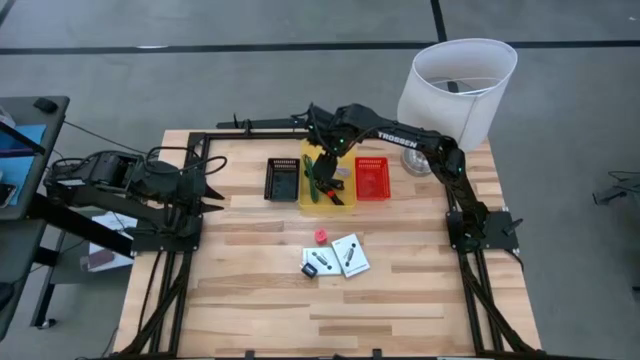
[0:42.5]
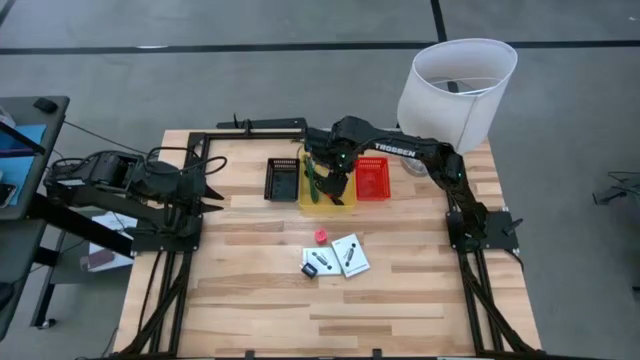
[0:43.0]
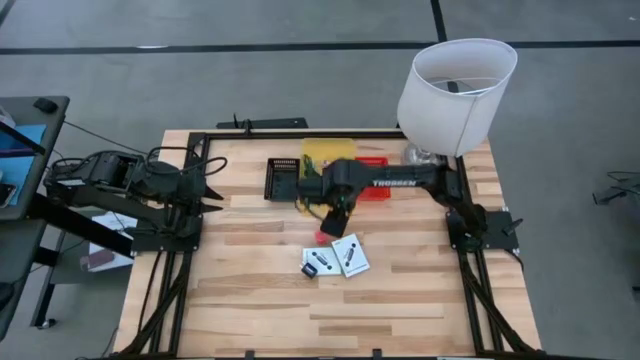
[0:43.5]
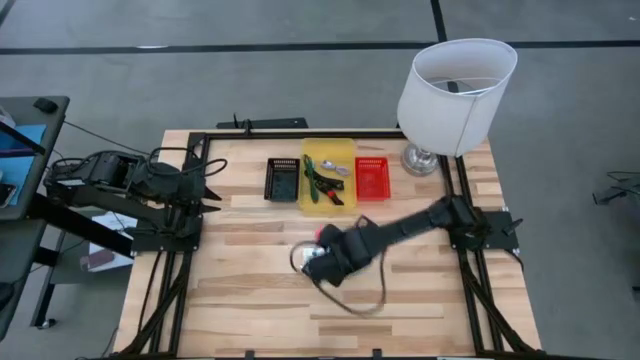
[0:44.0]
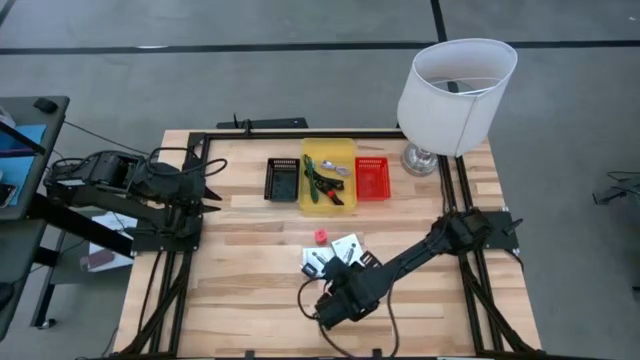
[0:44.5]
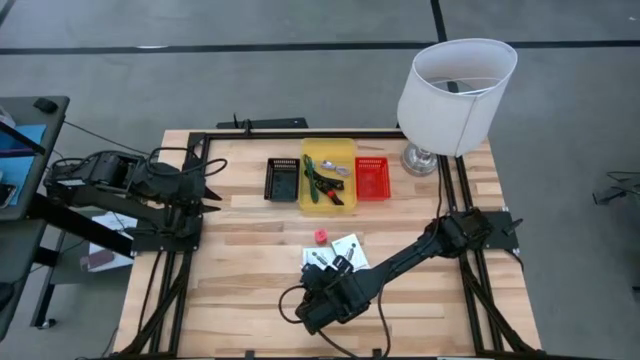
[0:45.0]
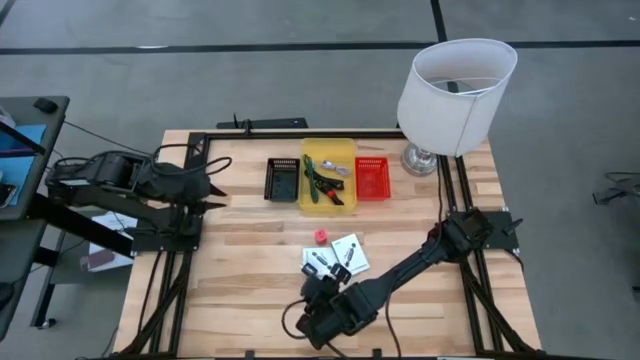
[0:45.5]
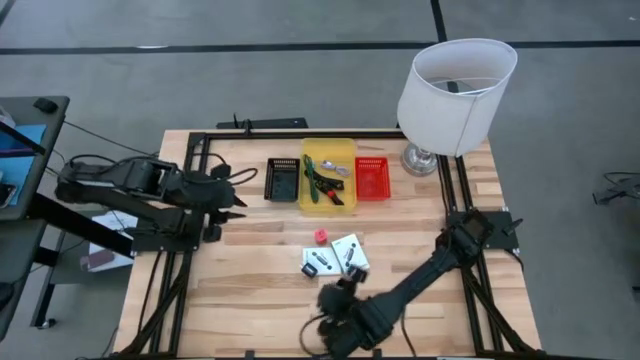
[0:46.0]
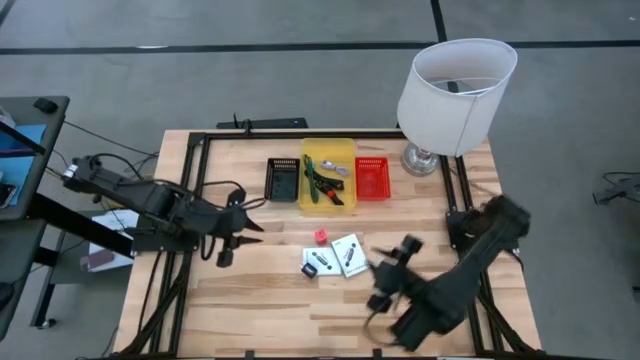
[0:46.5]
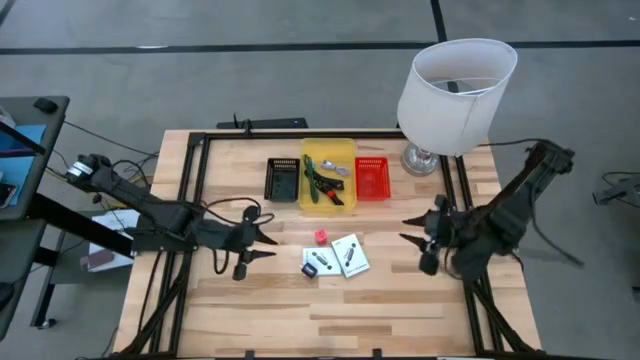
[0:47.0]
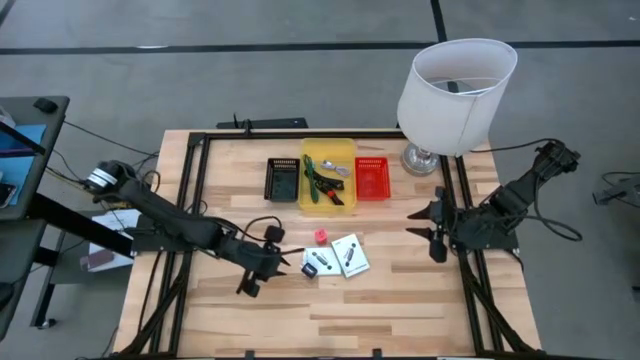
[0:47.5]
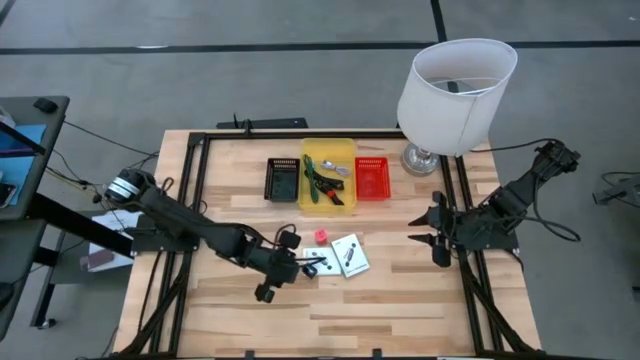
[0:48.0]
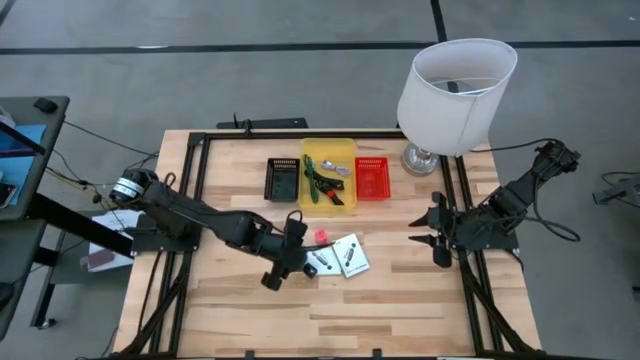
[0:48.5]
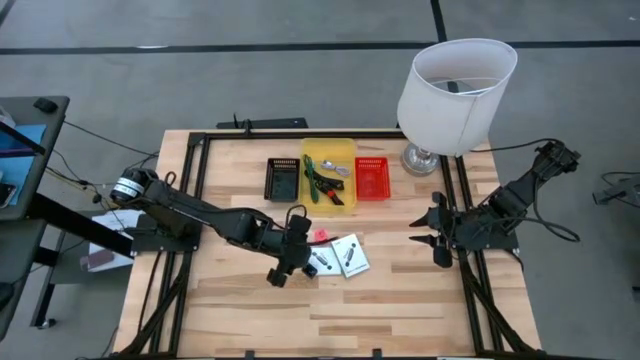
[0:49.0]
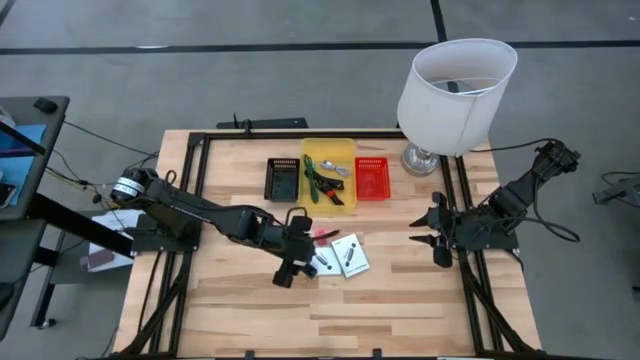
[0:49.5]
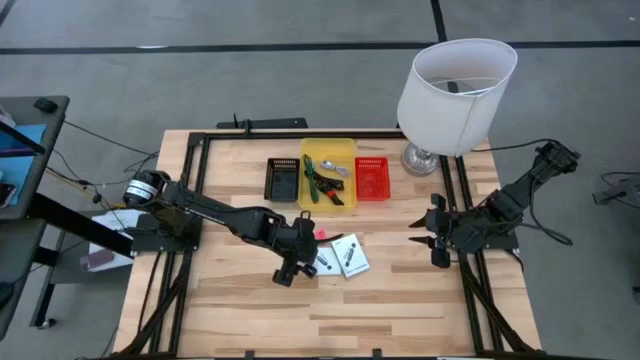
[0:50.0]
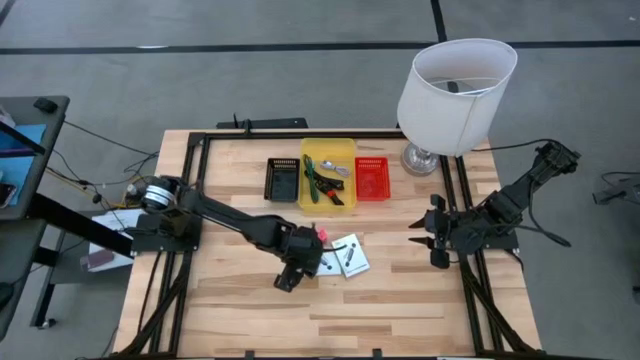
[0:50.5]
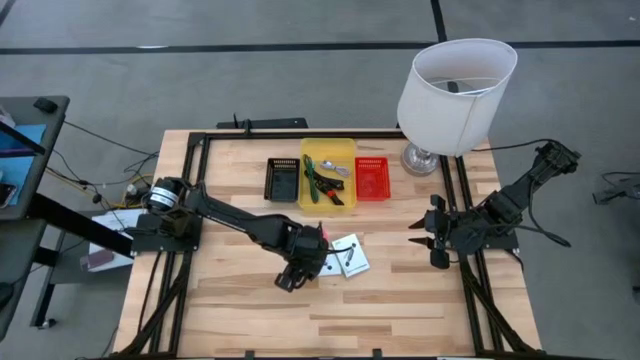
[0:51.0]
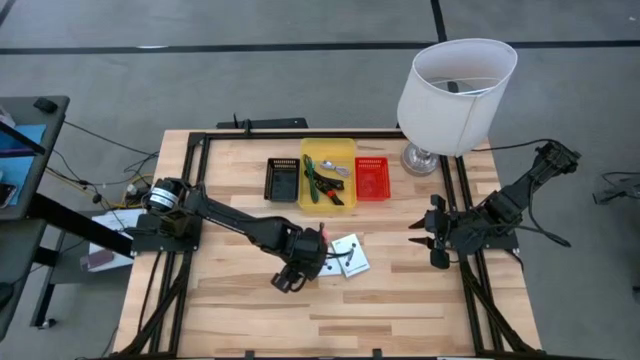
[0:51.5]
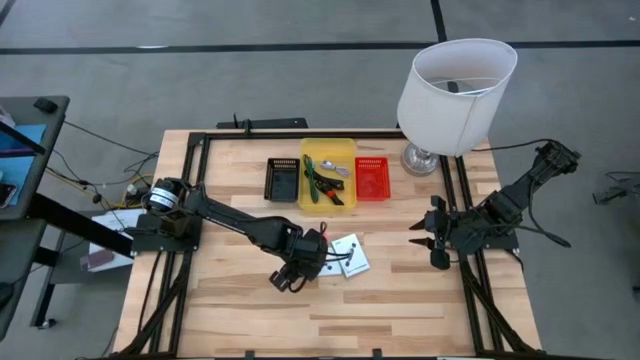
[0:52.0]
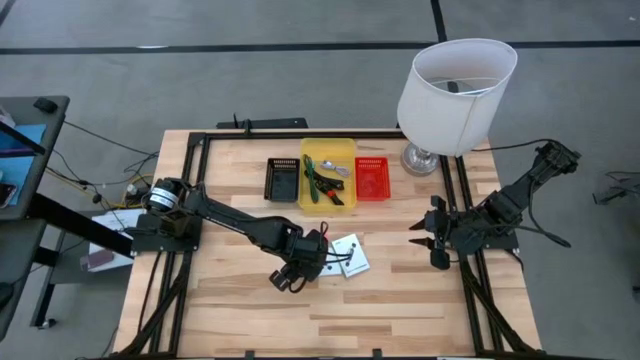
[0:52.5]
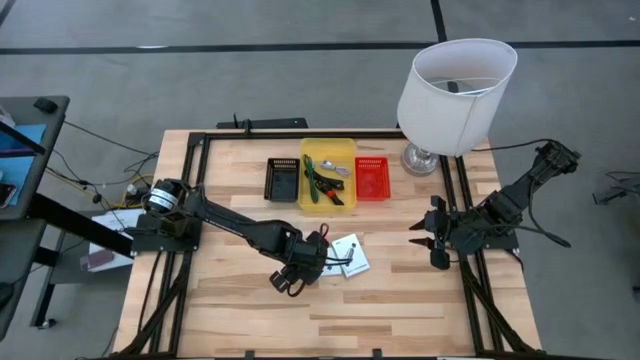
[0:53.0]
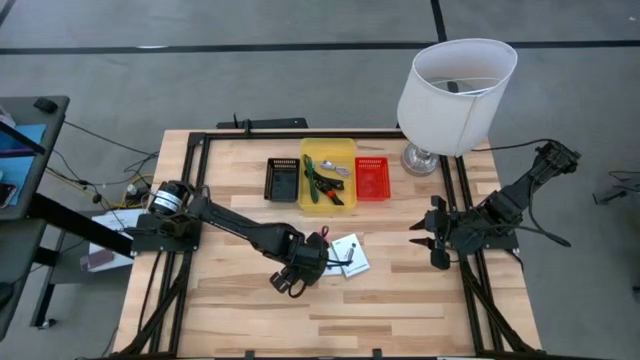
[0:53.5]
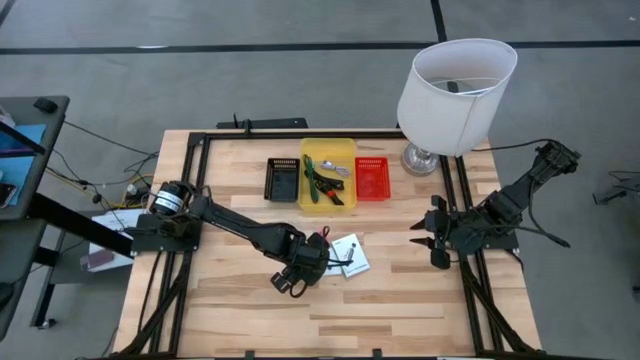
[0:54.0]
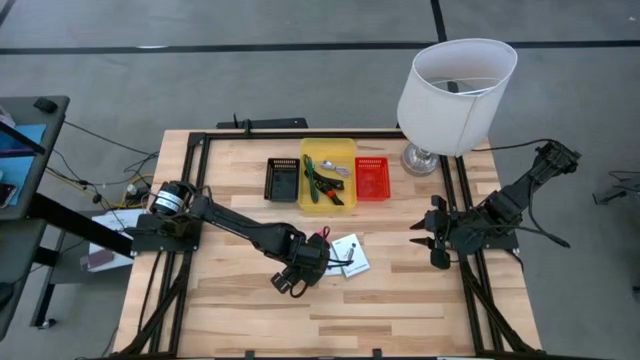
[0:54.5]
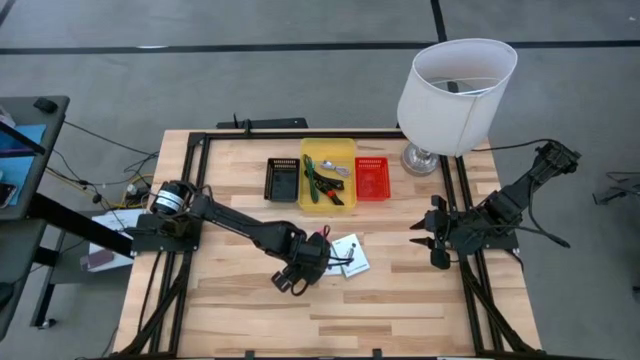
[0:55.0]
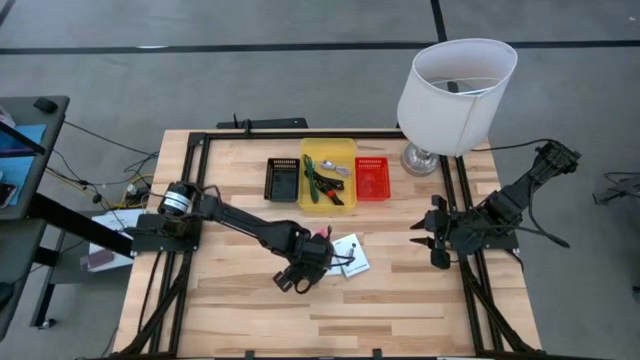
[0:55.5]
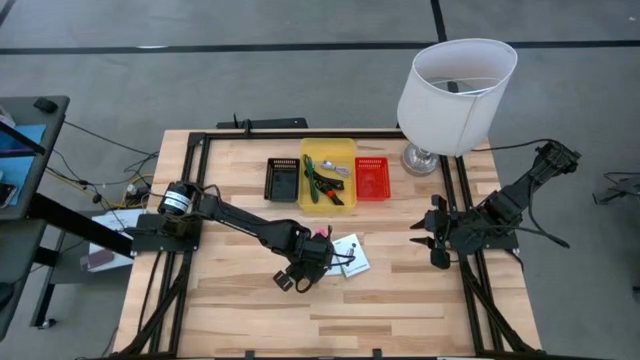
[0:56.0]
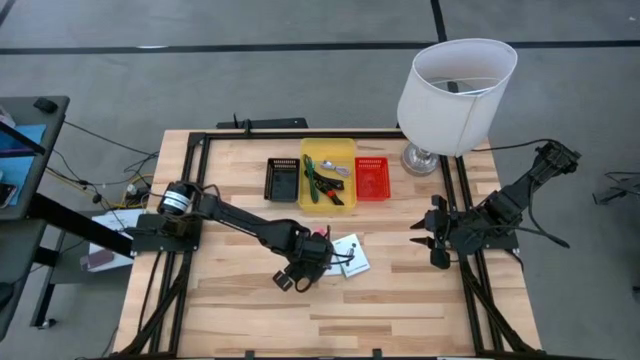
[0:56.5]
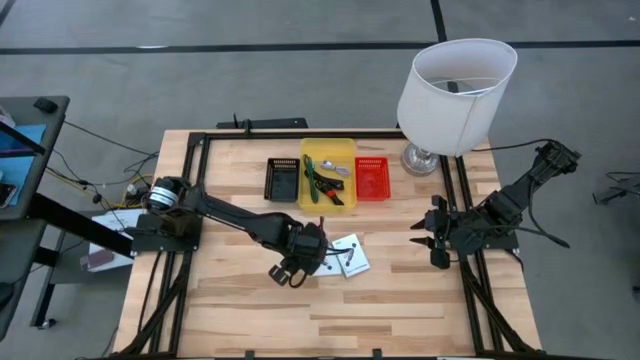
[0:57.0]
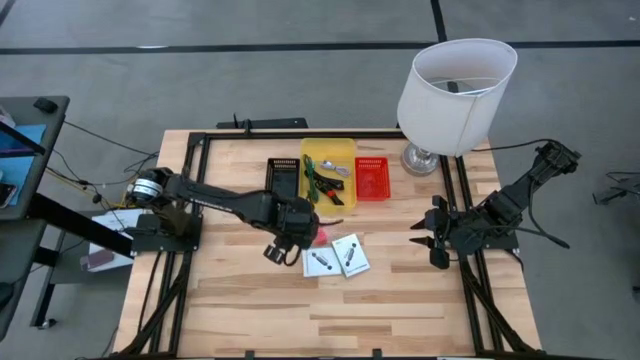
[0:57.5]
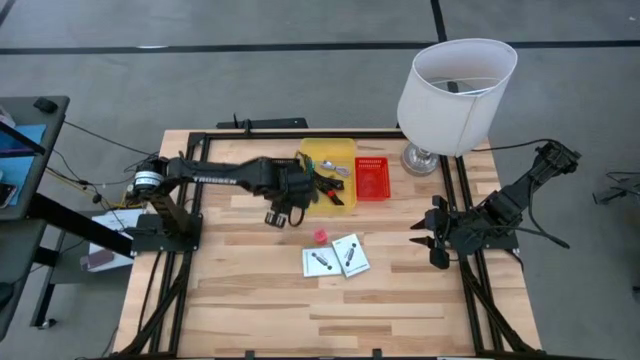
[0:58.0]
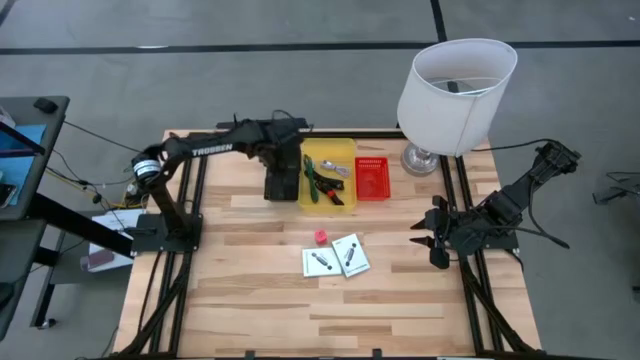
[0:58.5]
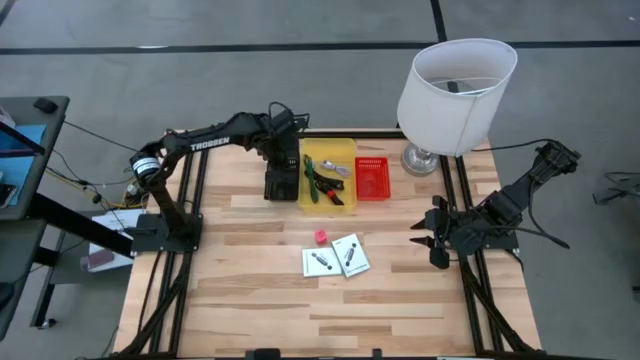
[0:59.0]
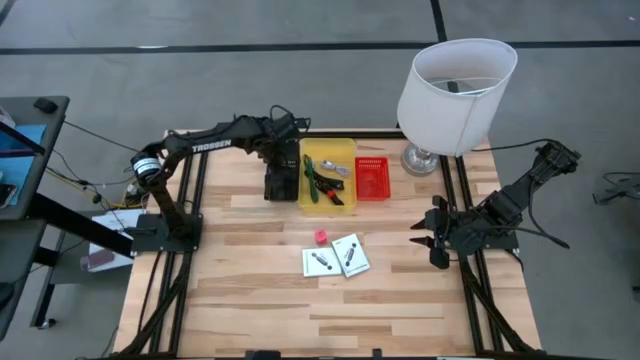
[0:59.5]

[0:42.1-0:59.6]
Task: Pick and place items into bin
Put the black charger adapter into the black bin

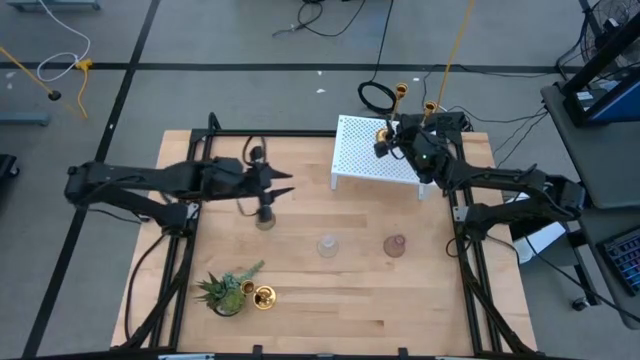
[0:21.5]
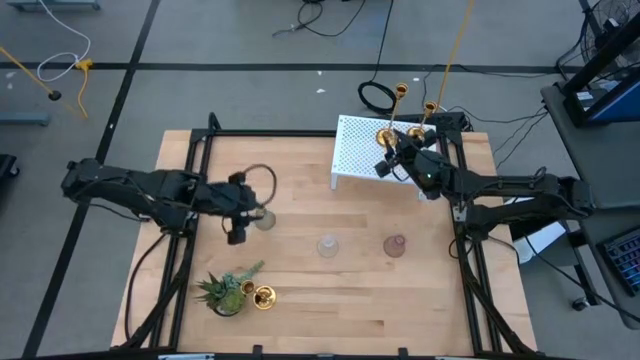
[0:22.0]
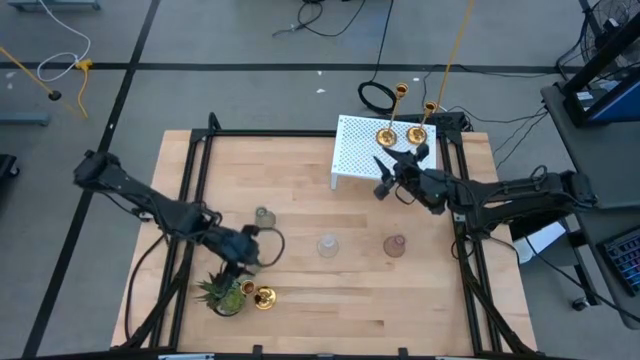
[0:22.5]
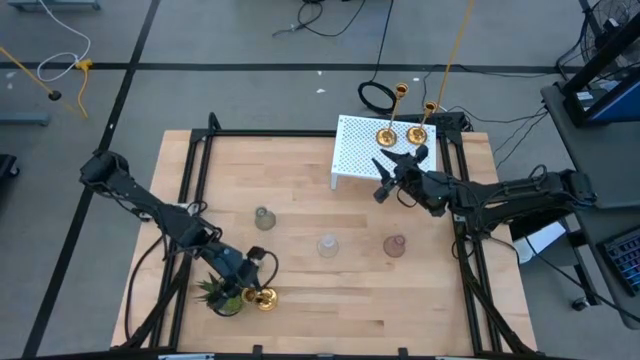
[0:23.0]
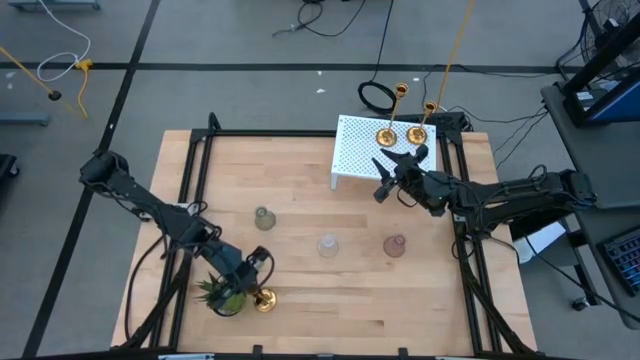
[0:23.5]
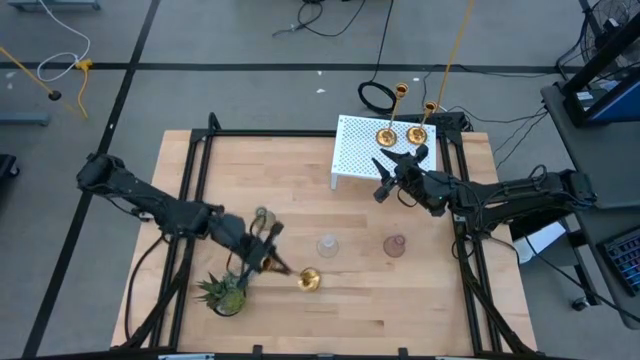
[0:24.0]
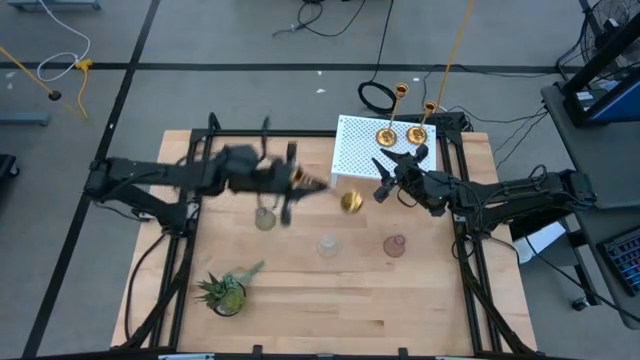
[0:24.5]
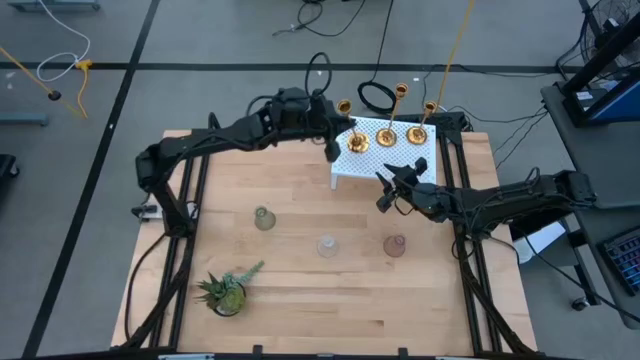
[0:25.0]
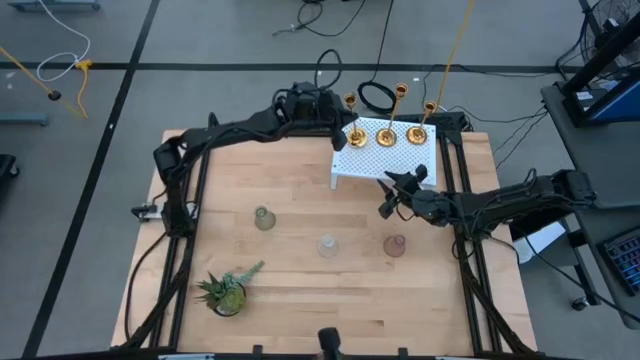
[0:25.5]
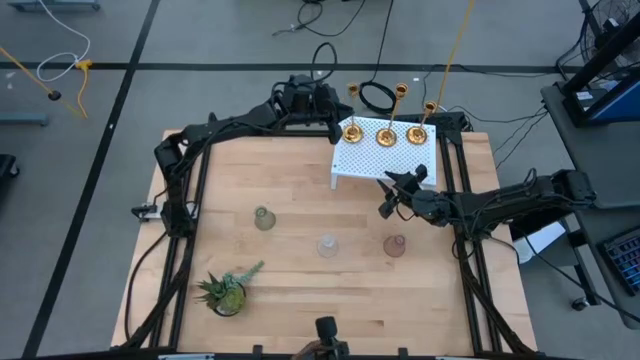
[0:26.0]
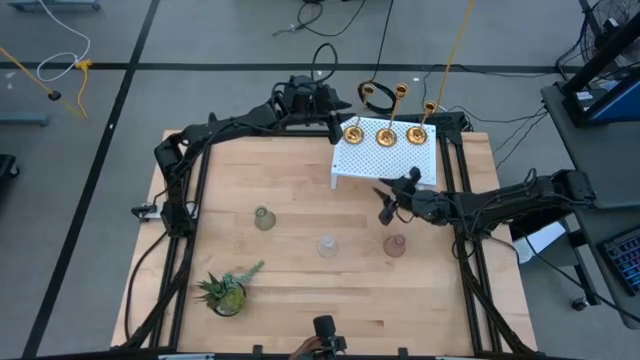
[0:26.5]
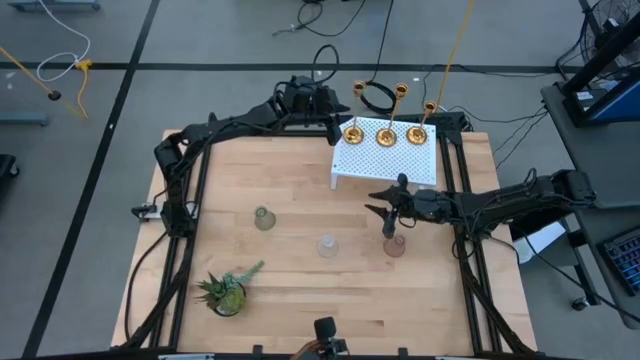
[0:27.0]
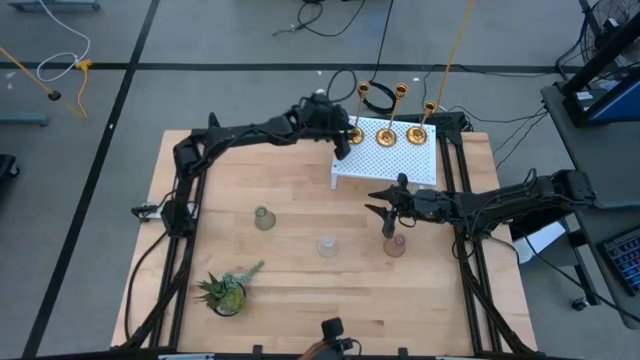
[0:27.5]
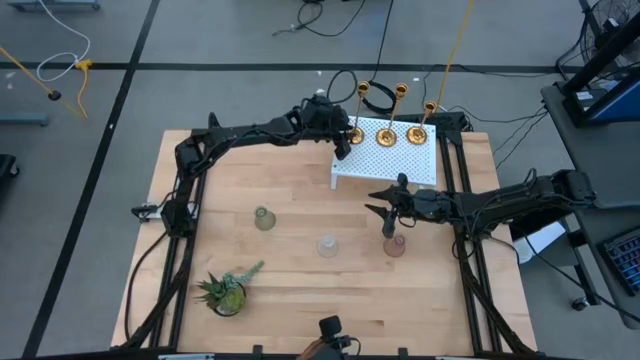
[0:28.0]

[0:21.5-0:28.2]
Task: Pick & Place candle stick holders
Put the gold candle holder on the shelf
